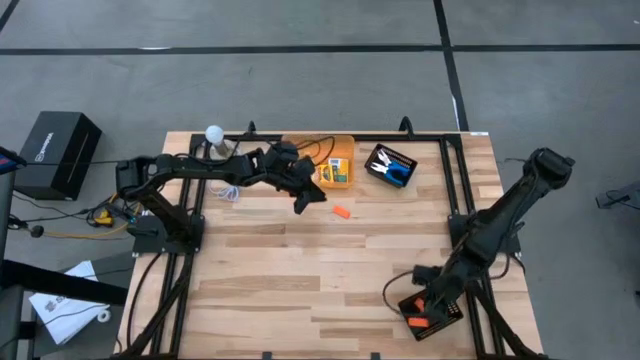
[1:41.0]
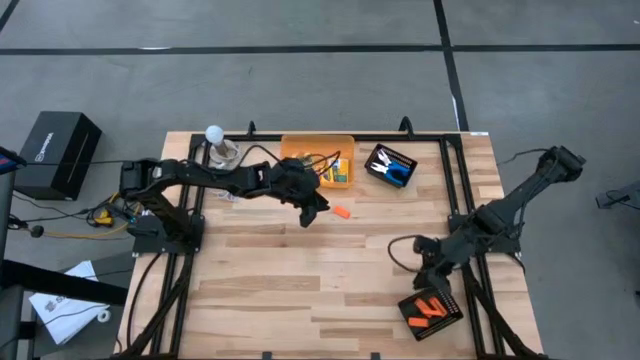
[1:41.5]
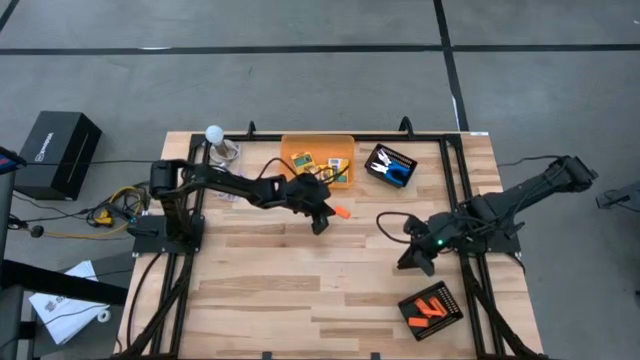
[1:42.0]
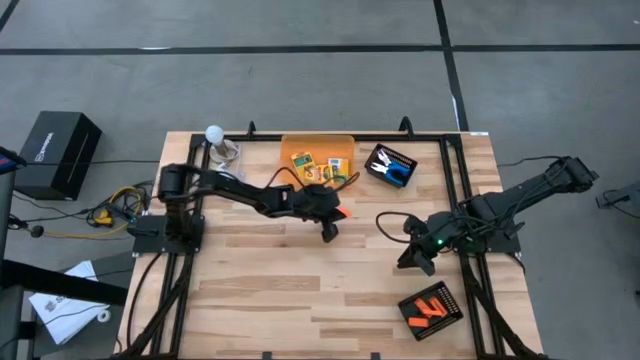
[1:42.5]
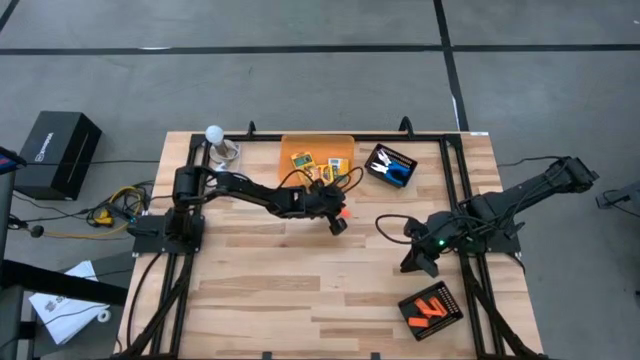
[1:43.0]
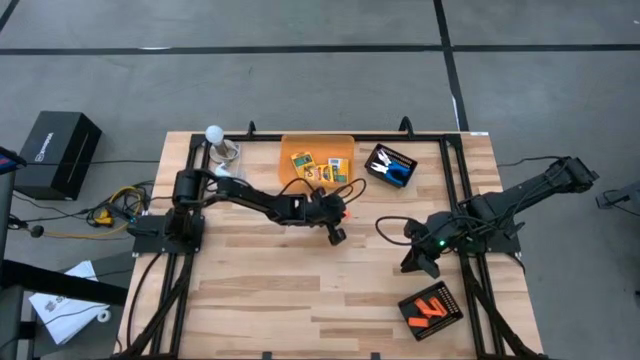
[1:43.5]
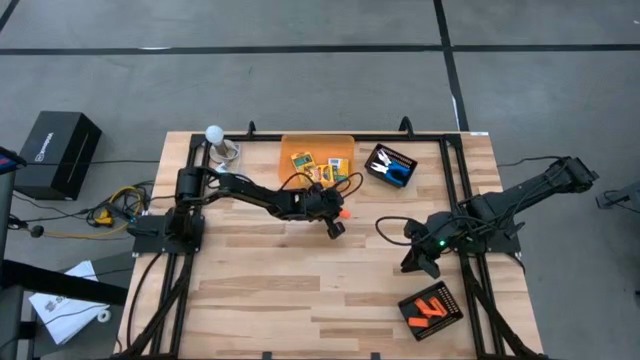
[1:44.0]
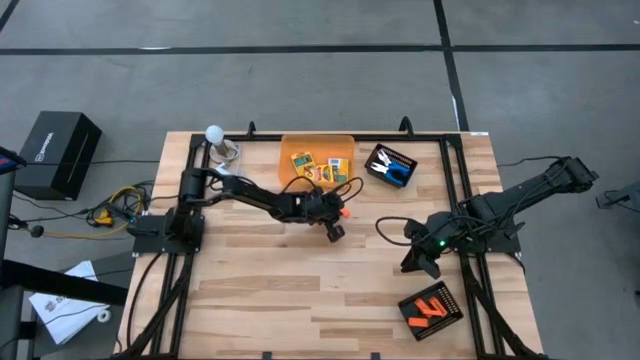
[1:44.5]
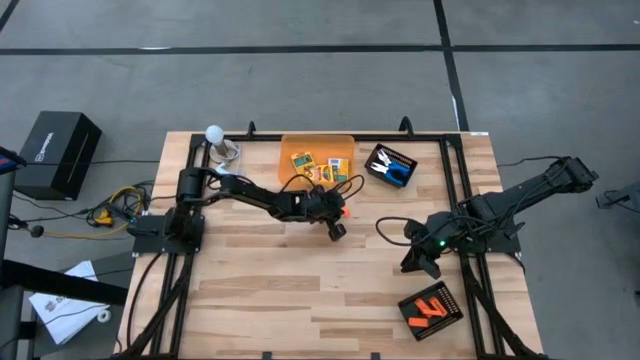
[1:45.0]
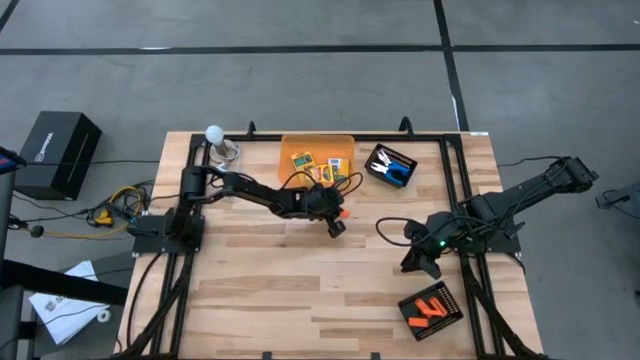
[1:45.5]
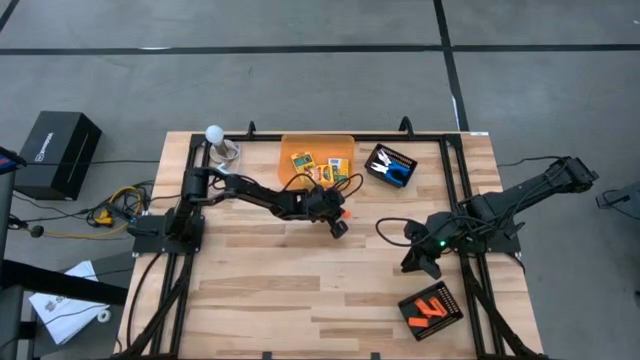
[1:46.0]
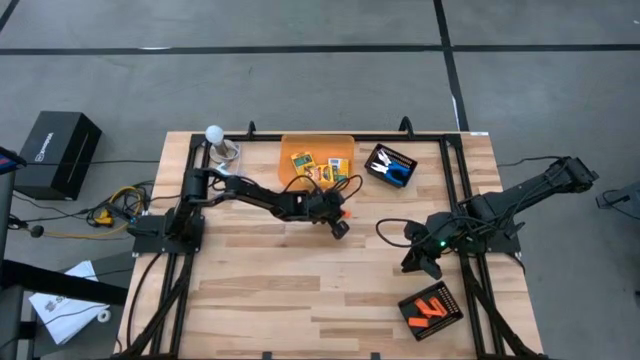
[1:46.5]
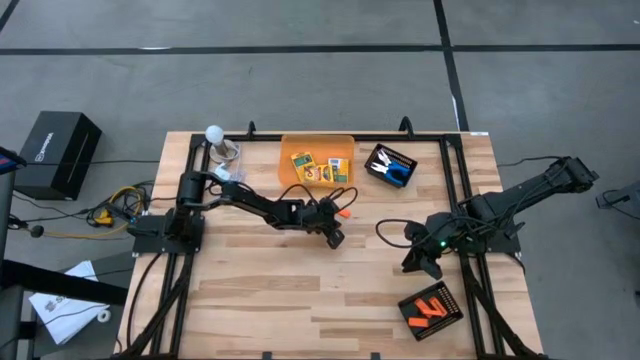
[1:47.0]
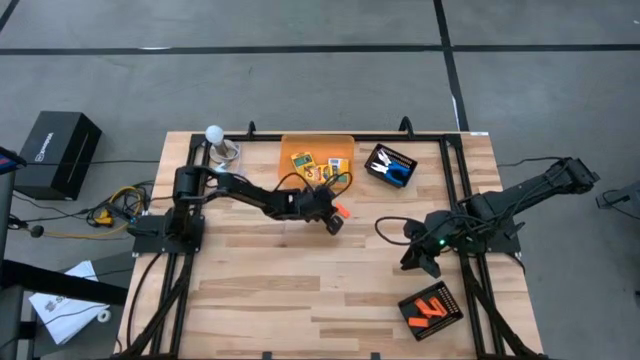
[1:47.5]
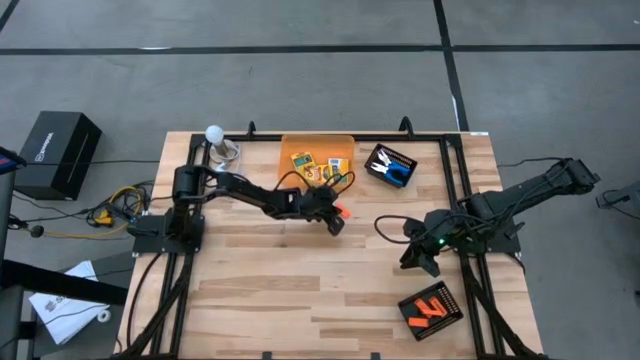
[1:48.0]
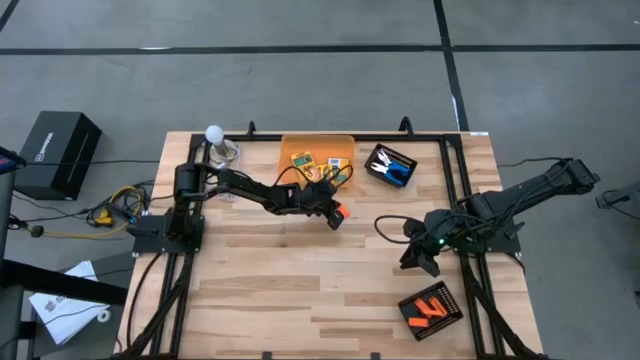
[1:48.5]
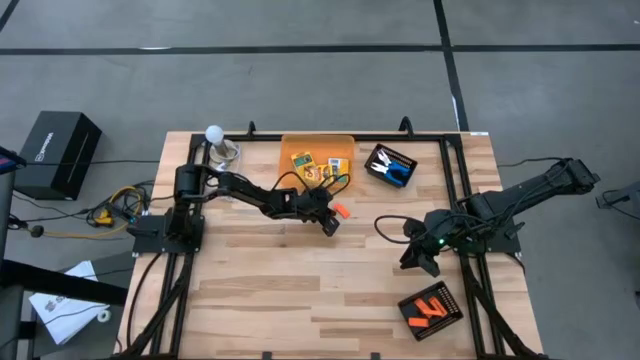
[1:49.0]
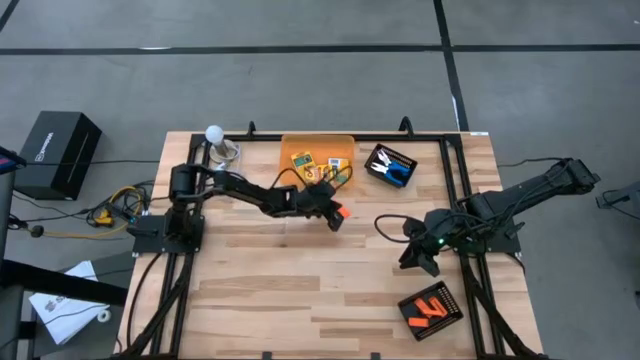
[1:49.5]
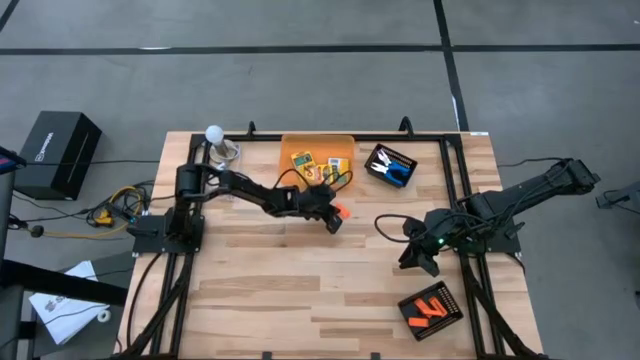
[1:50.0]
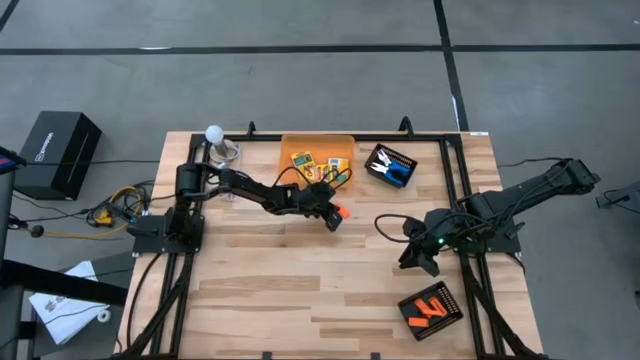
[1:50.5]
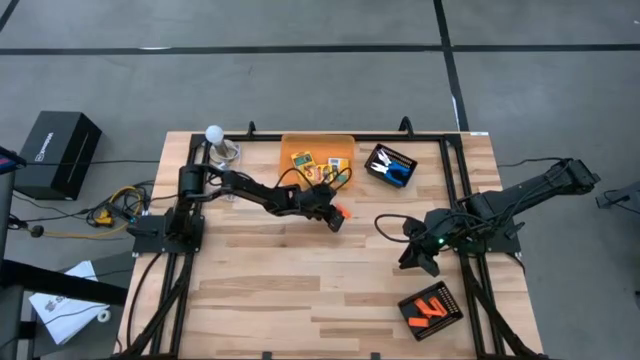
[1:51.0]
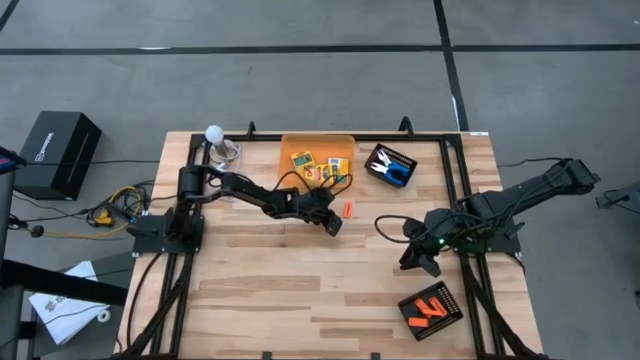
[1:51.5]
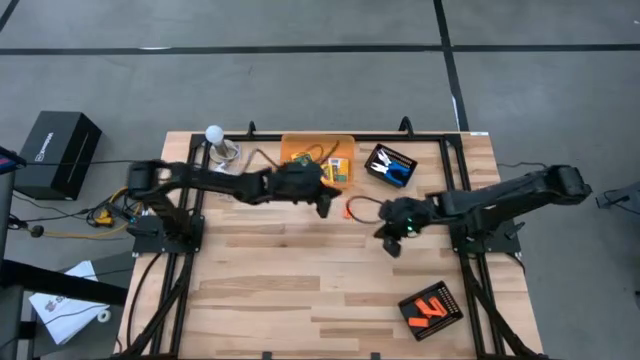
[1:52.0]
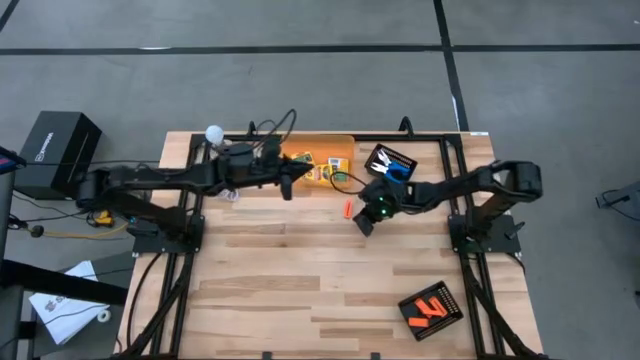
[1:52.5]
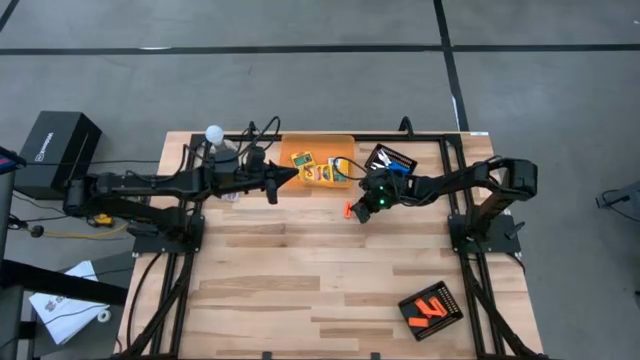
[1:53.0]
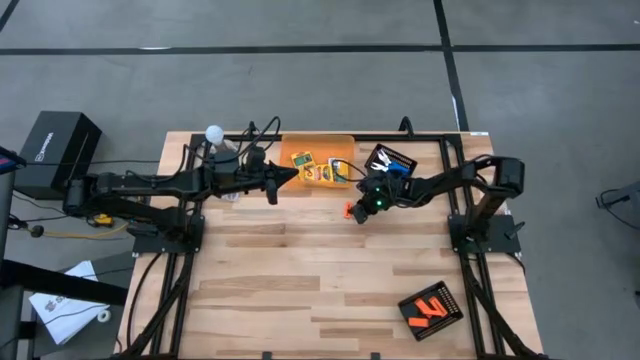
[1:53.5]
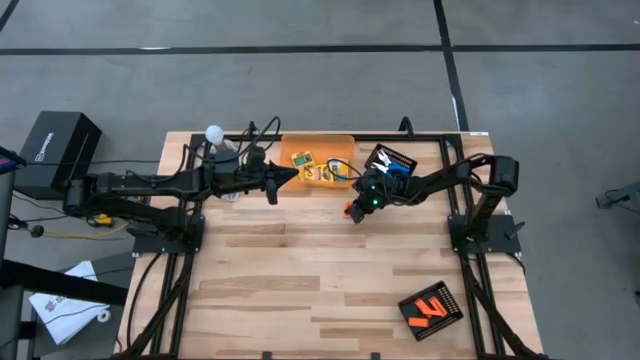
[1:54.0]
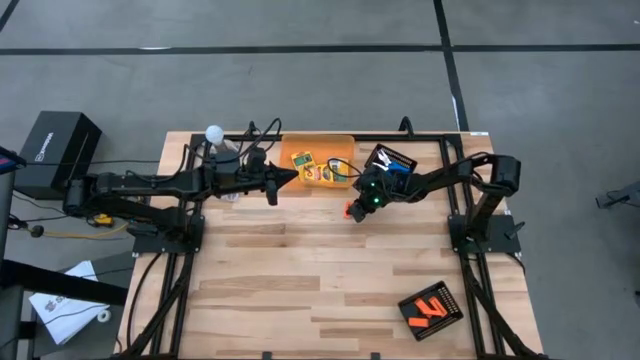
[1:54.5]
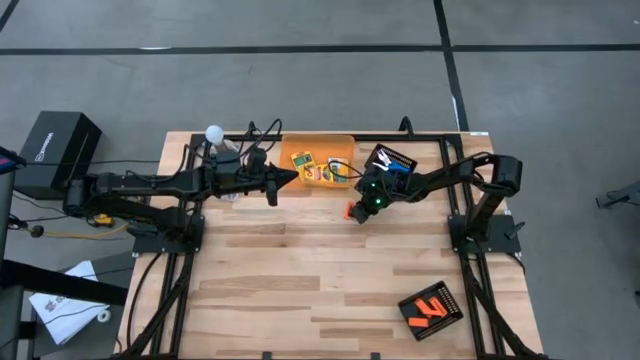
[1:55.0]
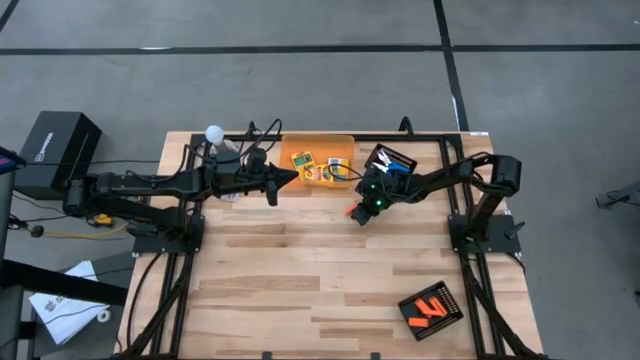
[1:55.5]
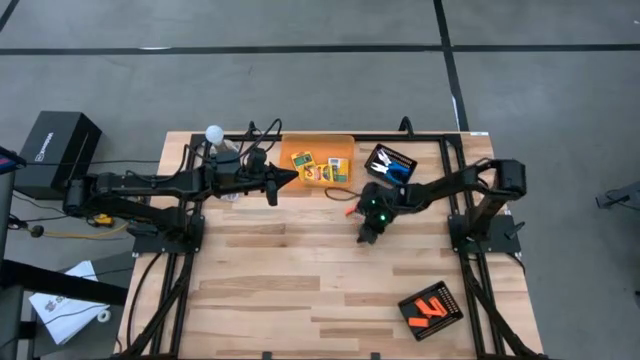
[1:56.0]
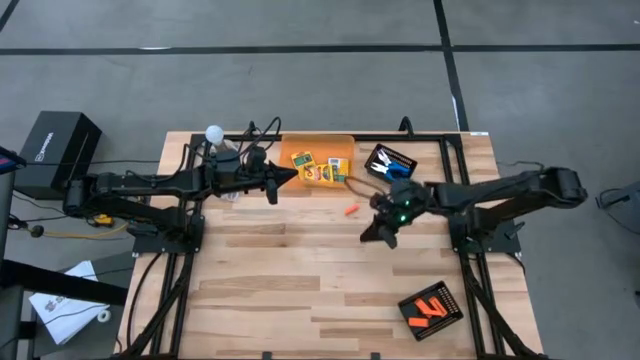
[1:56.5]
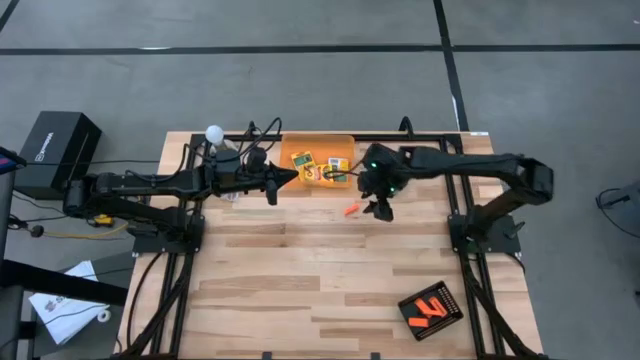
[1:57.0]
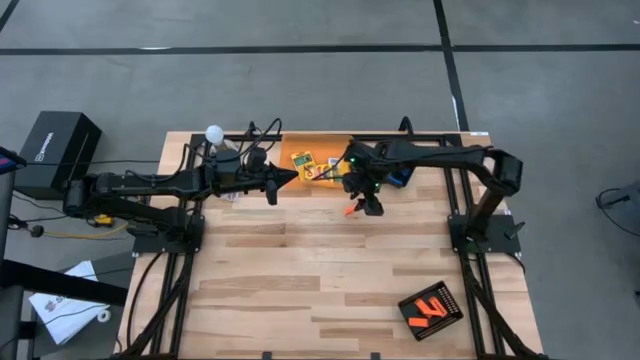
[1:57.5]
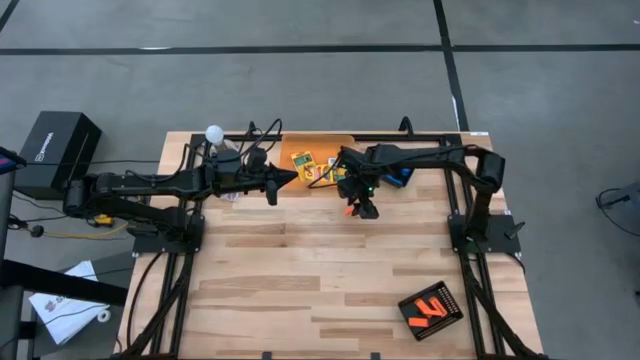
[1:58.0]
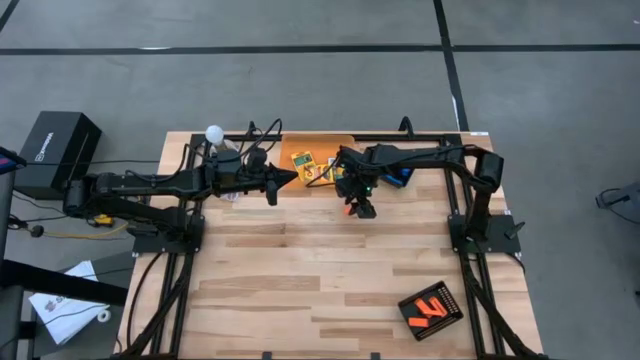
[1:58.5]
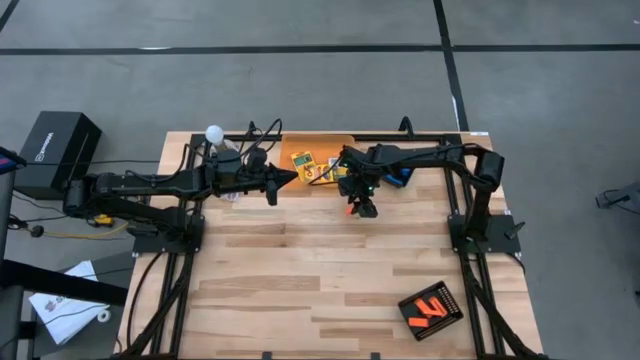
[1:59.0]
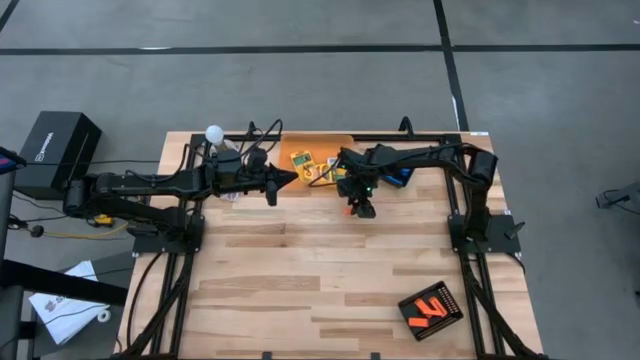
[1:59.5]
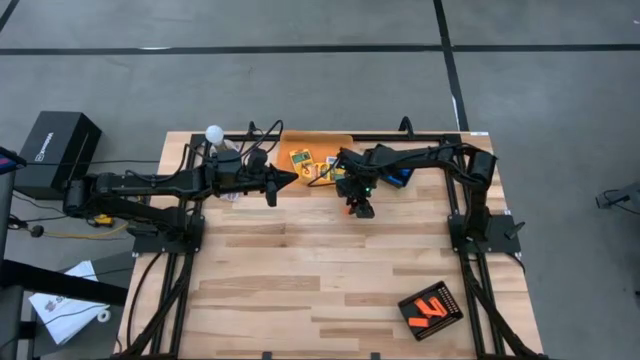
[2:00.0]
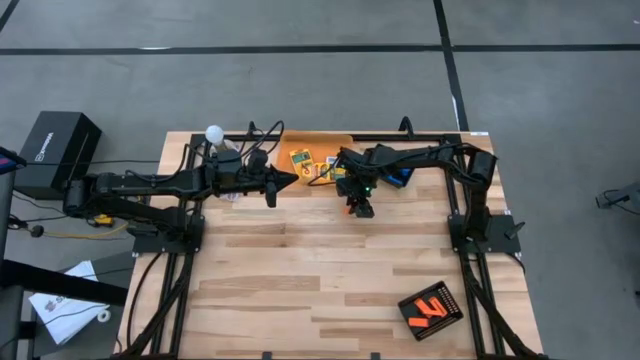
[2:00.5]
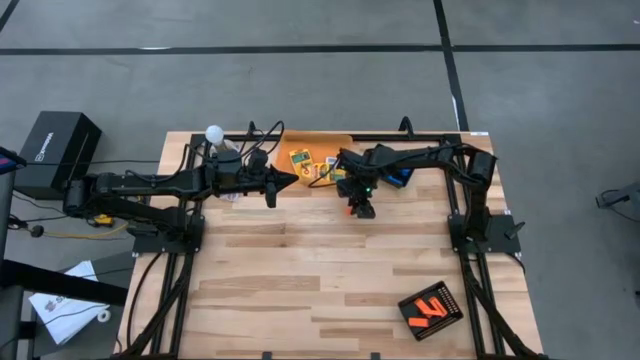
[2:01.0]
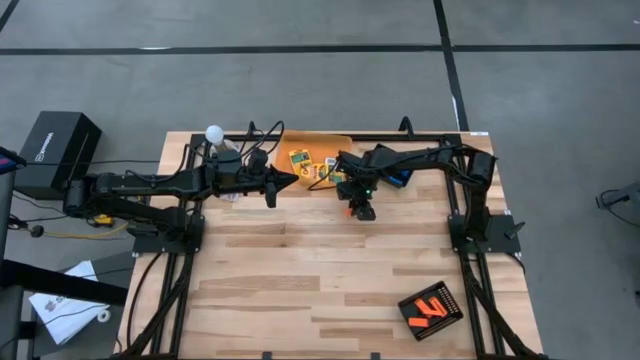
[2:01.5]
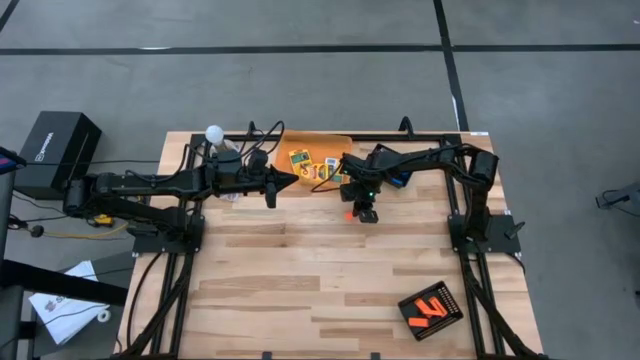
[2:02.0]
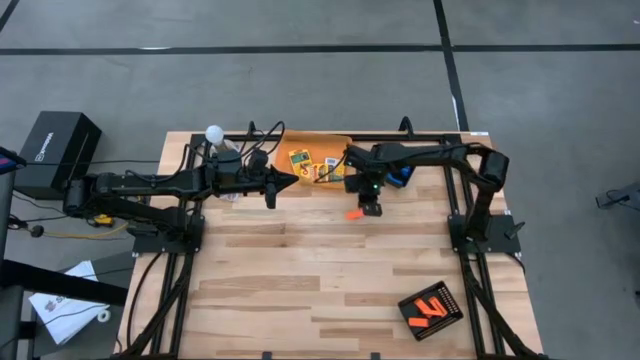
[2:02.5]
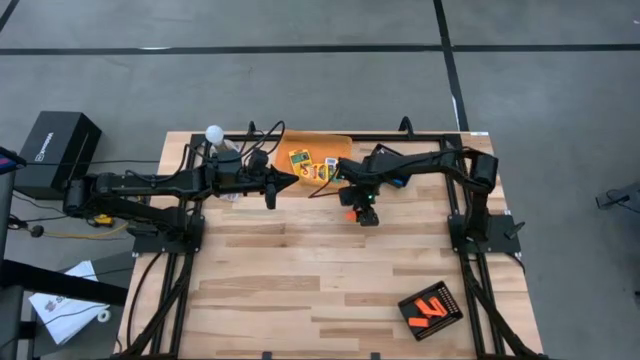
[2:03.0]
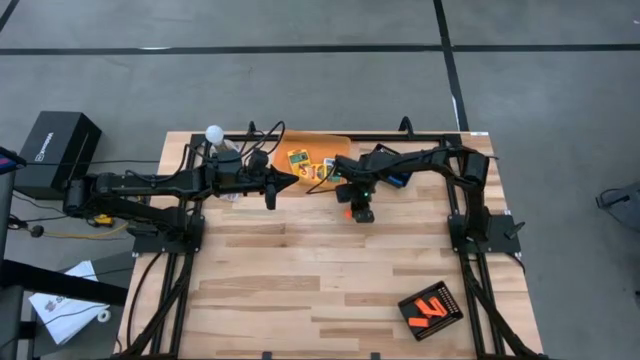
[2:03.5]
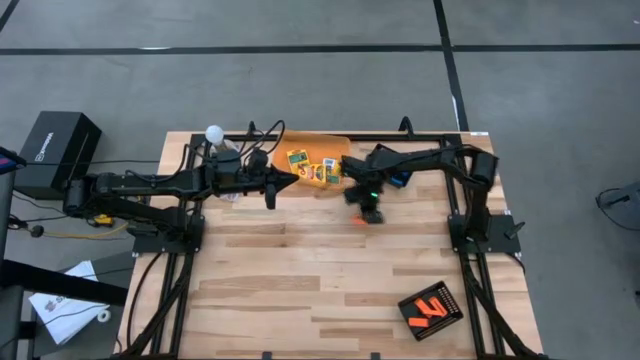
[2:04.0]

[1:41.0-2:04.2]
Task: Pick & Place School Supplies
Put the orange eraser into the bottom black bin
